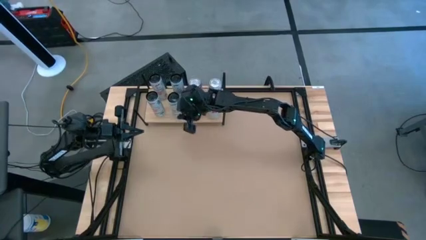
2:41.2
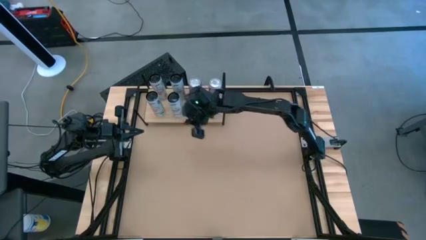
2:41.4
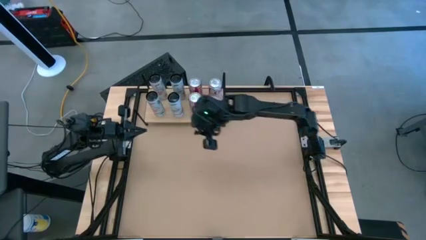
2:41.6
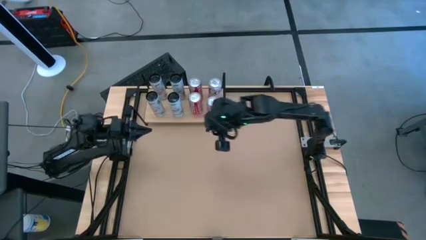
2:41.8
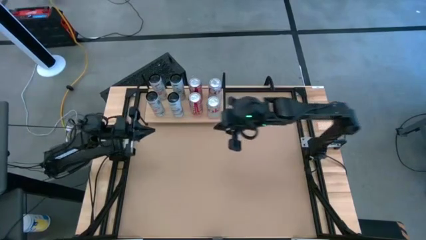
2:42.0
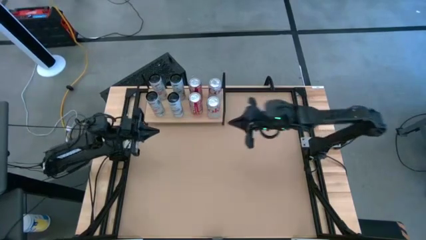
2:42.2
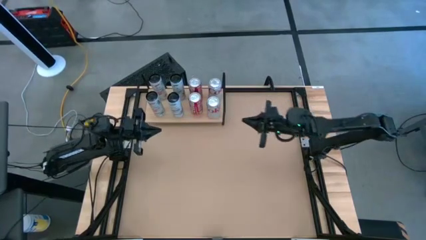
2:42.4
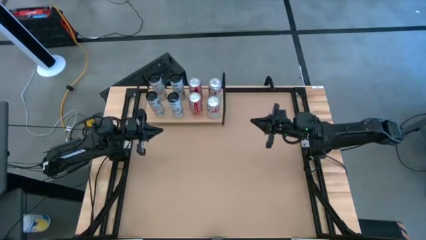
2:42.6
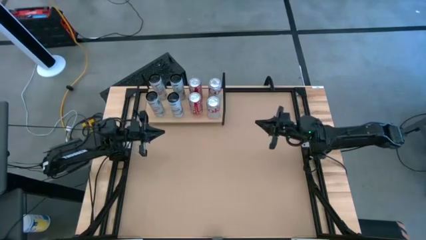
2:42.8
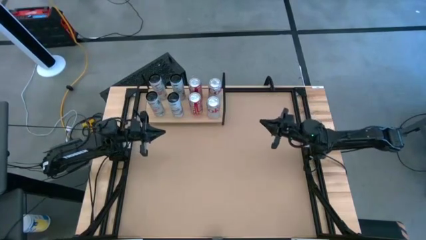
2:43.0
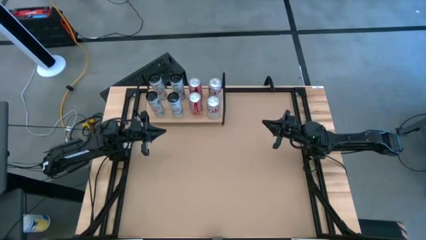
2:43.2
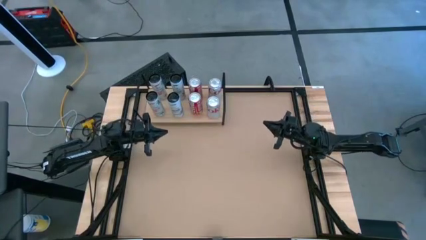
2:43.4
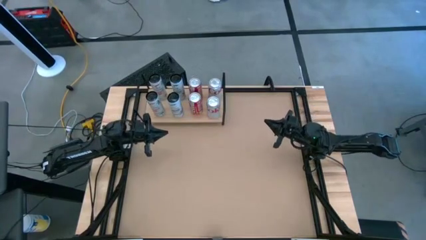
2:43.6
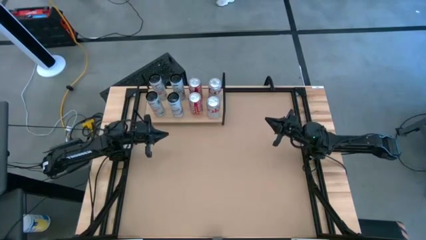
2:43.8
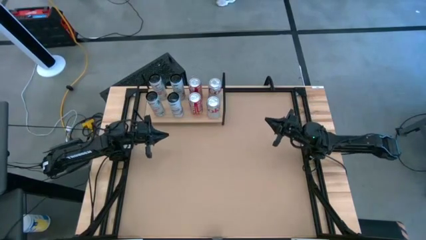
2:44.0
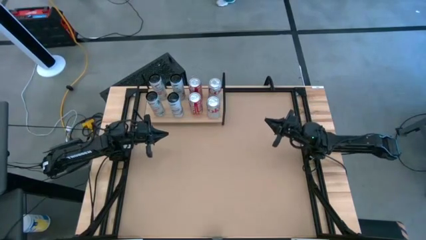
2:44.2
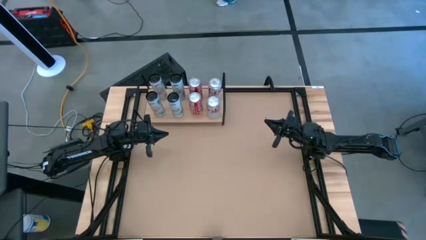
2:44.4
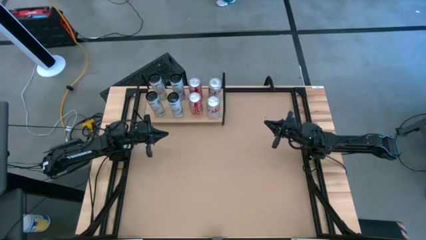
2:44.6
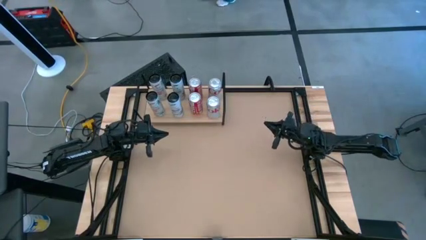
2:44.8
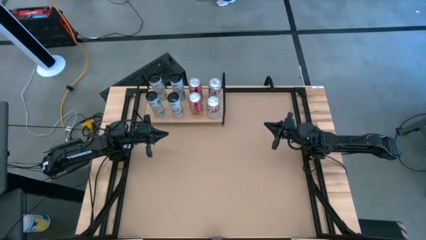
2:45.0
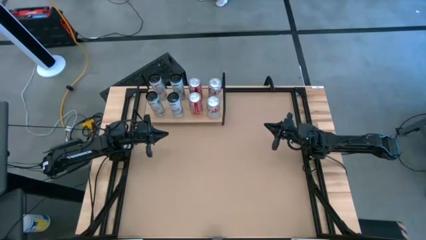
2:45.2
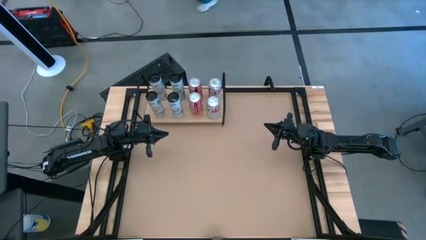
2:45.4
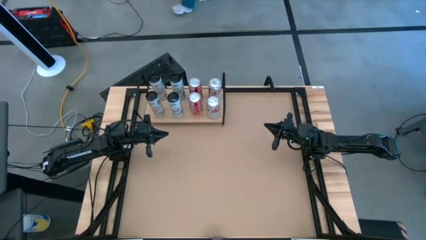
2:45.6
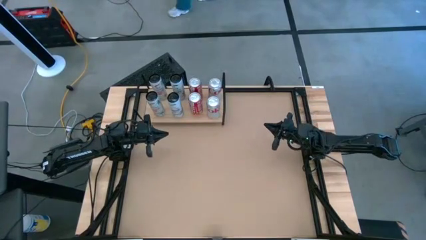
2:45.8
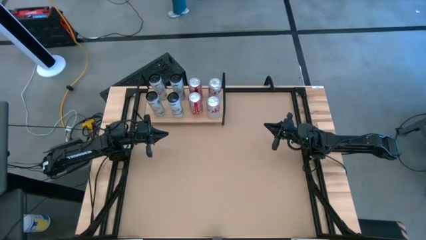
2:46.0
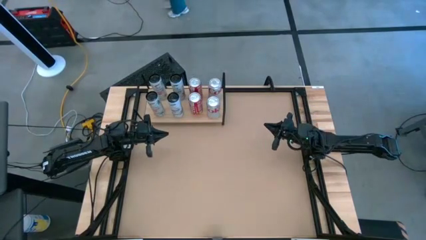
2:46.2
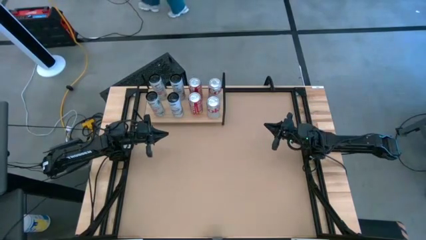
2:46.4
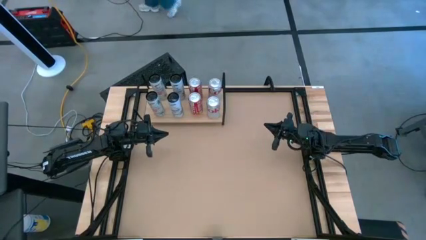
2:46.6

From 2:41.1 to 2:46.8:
Task: Place canned beverage on shelf
Return to Home Position

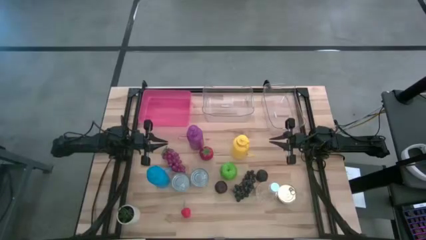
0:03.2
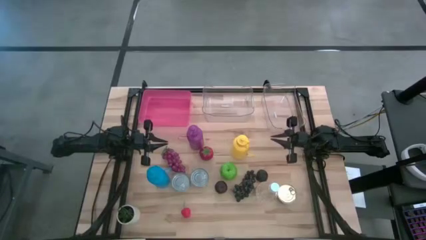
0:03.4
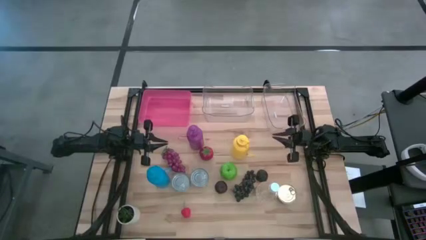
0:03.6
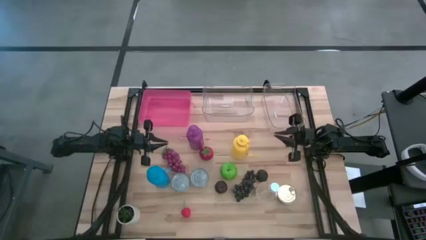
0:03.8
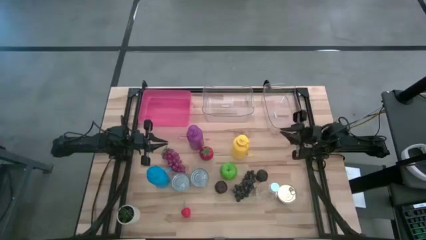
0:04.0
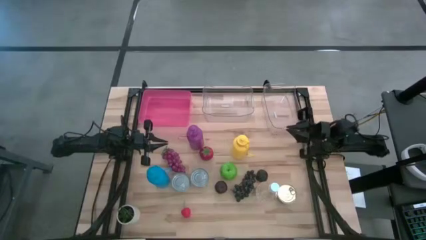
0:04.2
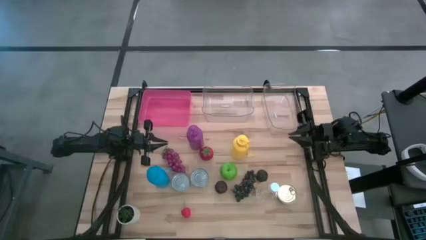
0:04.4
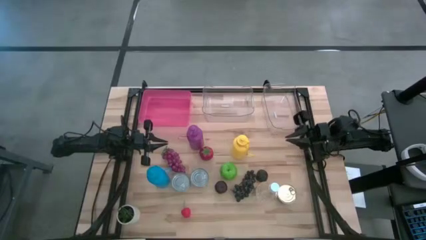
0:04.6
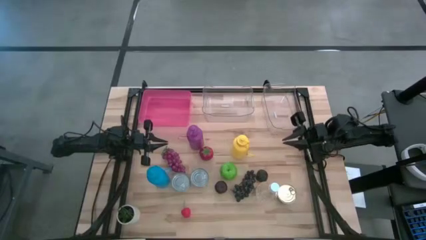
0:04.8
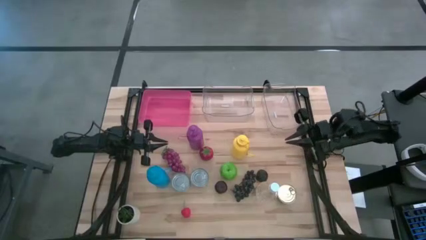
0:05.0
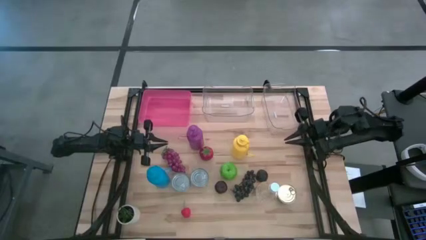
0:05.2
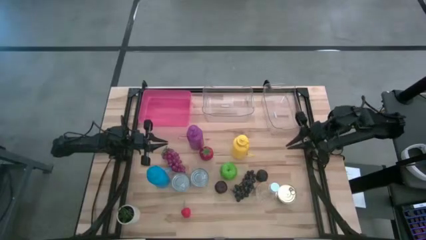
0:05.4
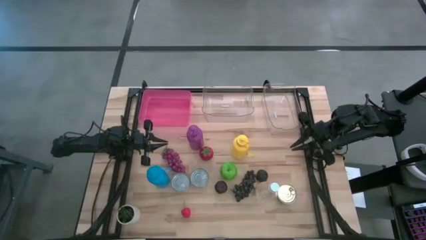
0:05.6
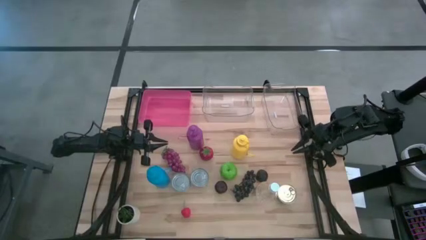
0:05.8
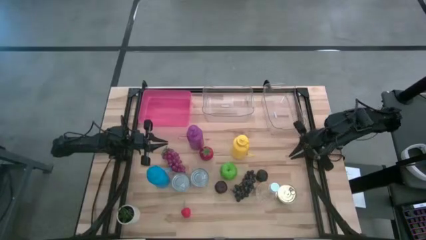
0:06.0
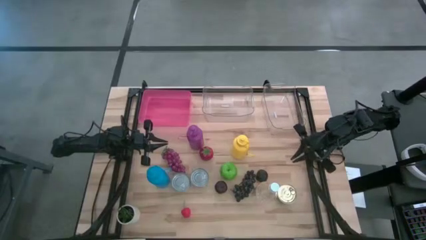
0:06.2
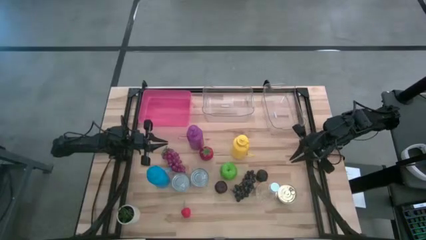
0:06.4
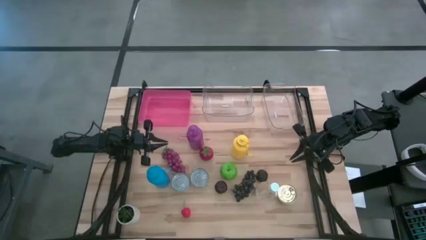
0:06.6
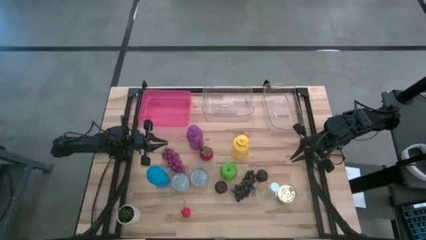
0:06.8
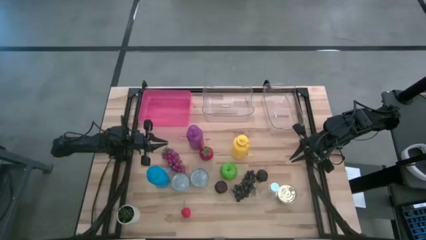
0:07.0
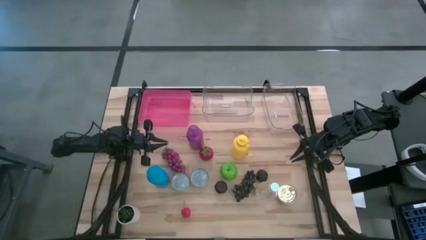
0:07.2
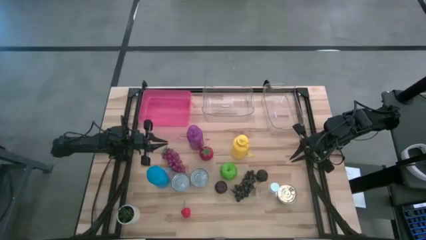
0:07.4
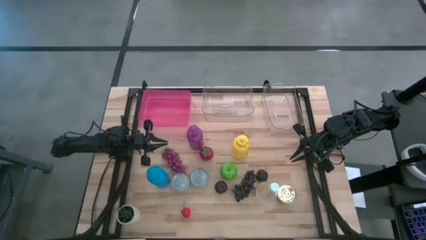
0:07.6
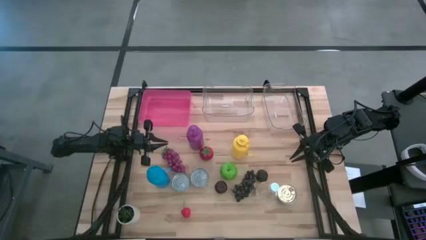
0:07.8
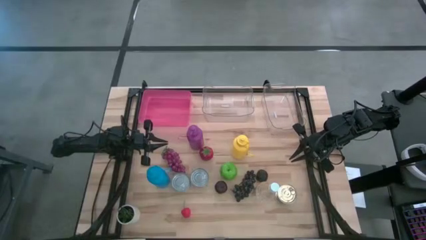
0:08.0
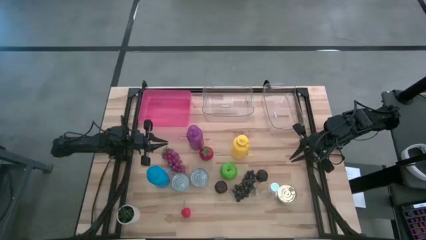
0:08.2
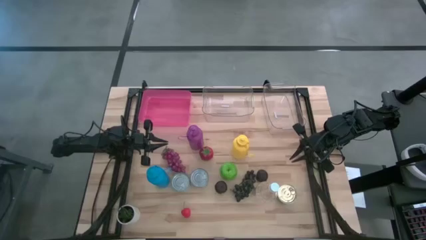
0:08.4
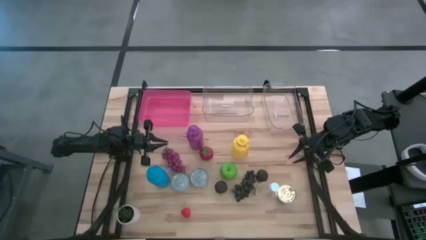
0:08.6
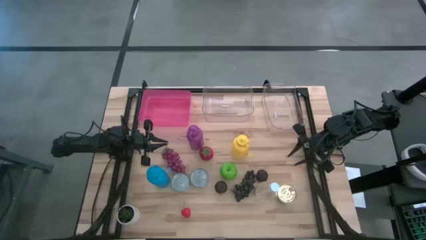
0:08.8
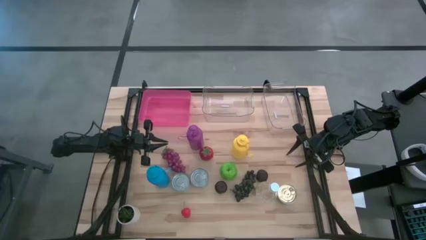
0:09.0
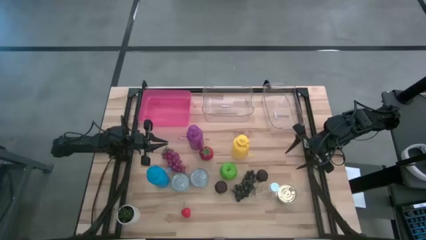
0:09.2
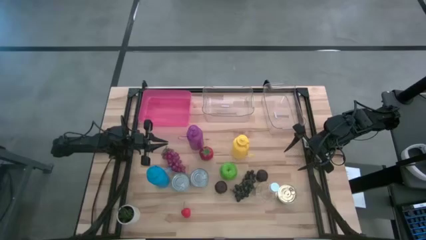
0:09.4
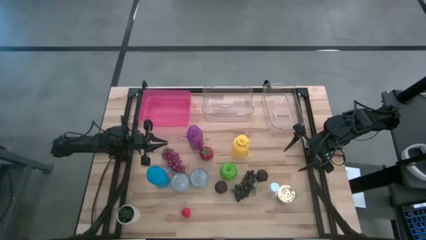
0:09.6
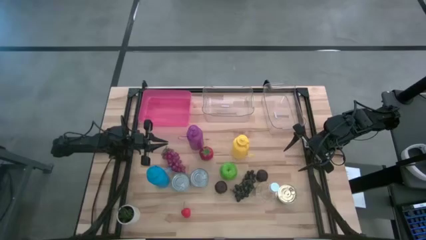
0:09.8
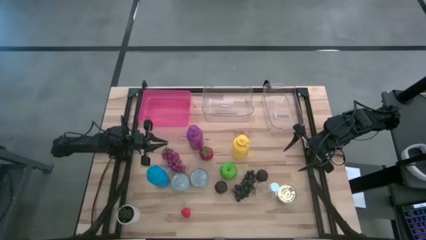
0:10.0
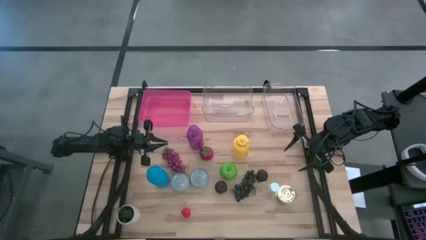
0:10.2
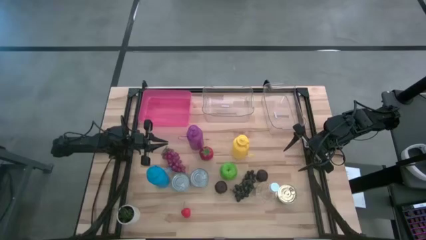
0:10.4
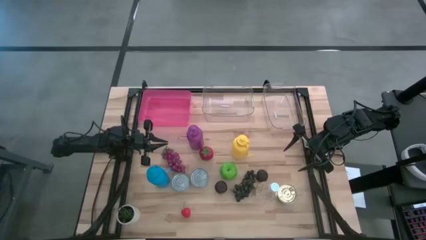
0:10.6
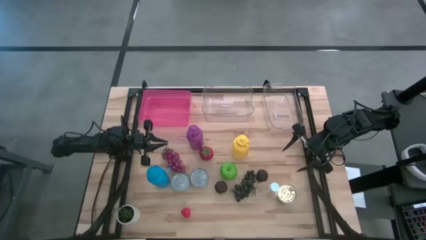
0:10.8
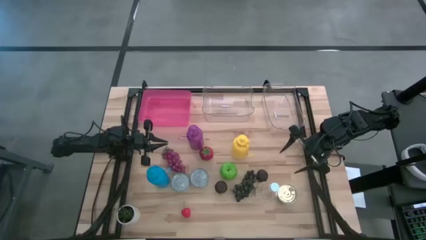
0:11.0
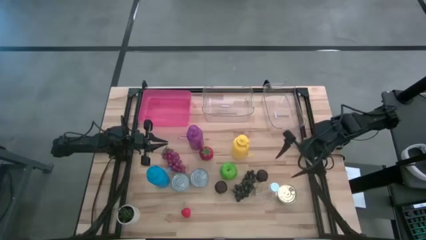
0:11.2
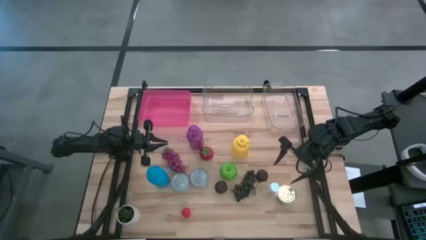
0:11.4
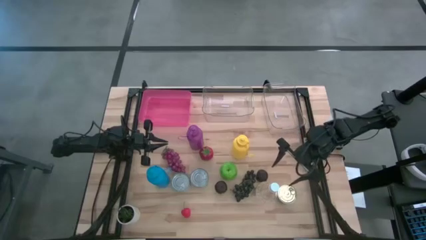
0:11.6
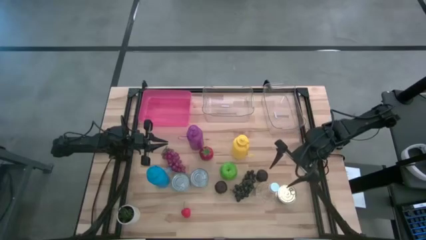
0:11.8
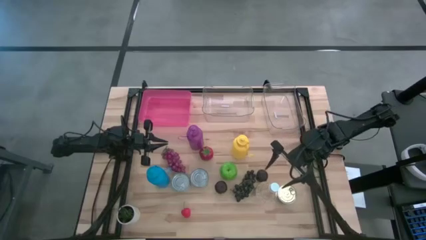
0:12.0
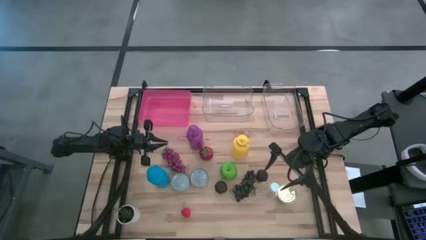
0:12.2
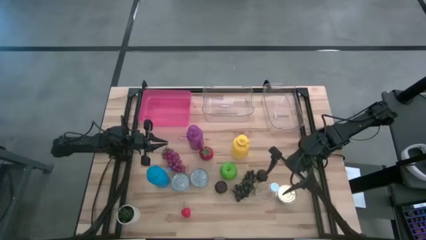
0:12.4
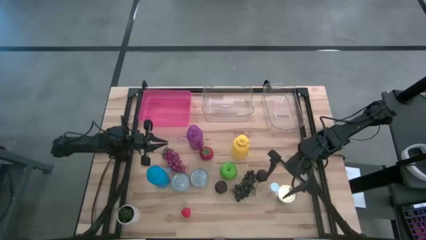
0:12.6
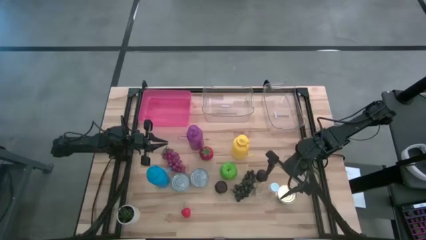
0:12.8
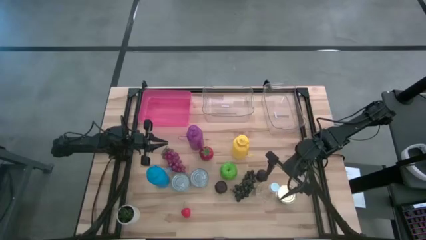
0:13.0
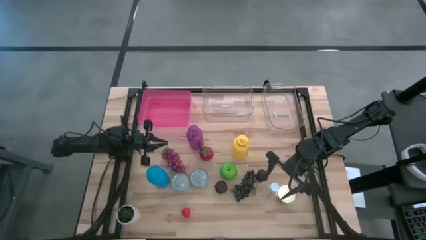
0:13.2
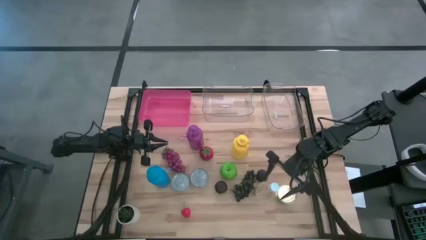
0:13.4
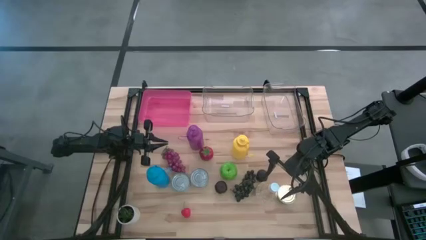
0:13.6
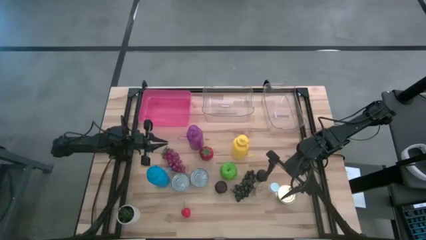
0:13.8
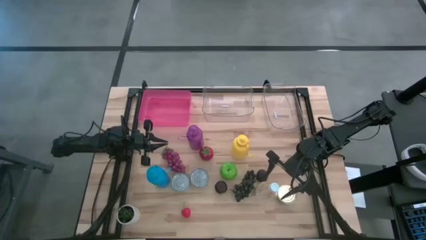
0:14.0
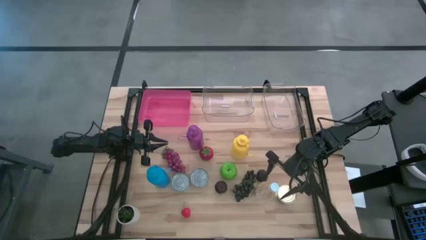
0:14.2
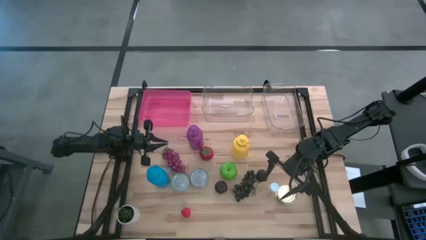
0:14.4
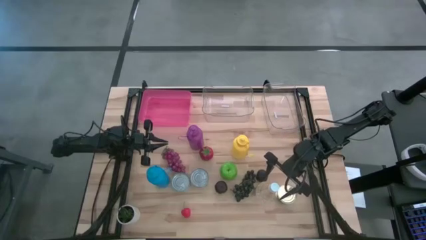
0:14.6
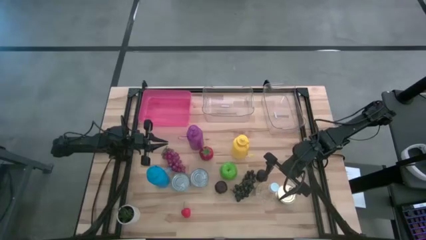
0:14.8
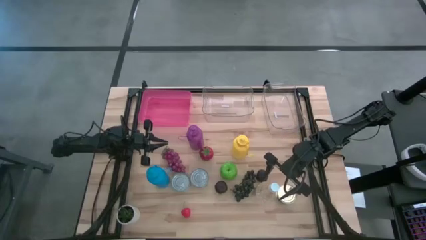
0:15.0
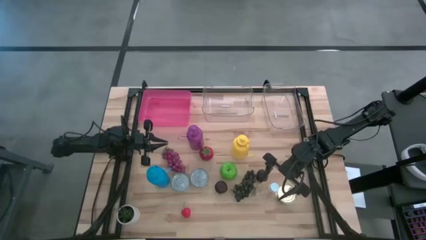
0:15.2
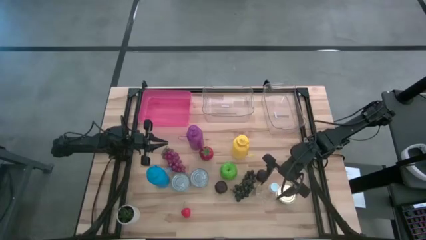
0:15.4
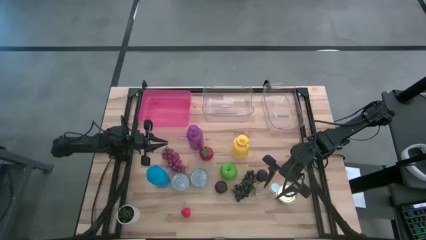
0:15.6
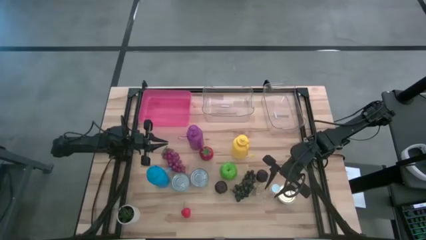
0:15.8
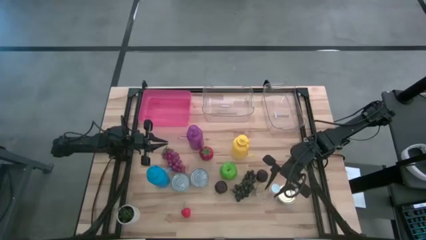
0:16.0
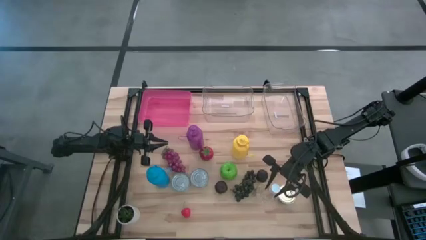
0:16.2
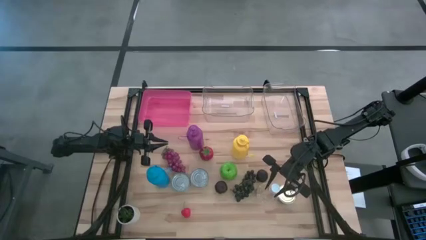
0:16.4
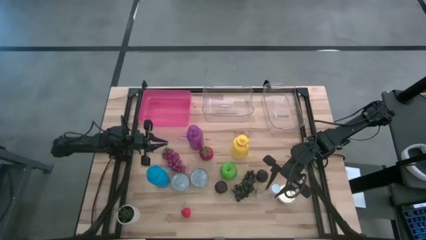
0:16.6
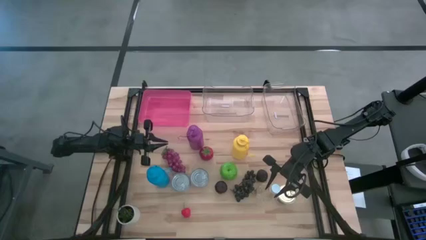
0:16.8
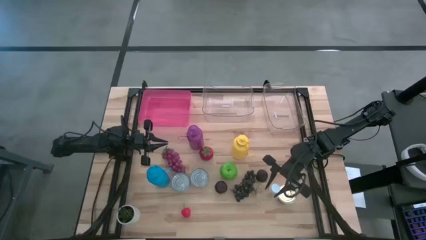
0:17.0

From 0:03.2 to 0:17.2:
Task: Pick & Place Food Item
Put the transparent water bottle into the right transparent bin
